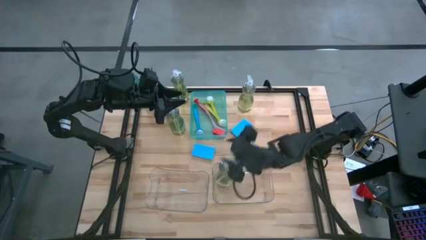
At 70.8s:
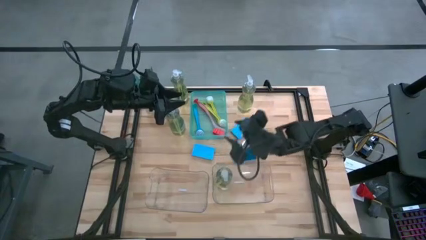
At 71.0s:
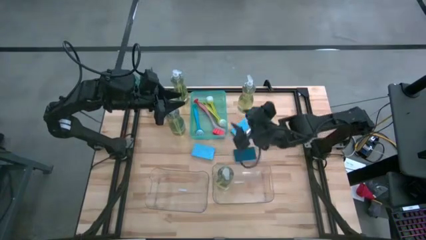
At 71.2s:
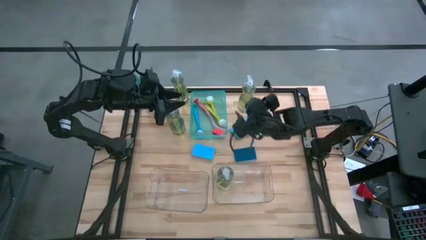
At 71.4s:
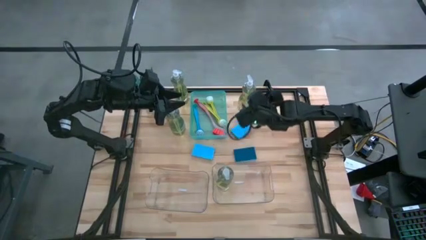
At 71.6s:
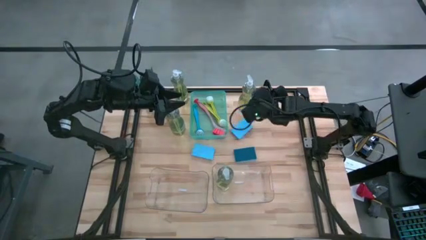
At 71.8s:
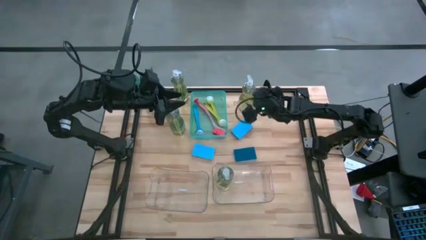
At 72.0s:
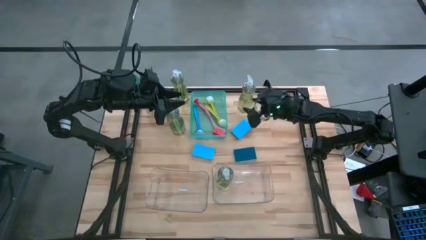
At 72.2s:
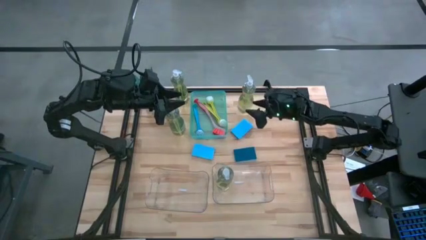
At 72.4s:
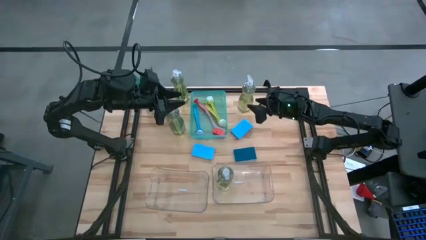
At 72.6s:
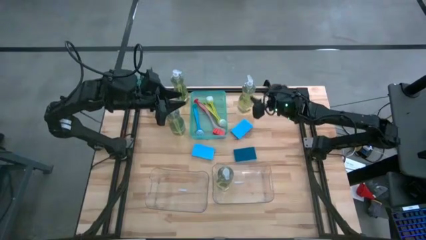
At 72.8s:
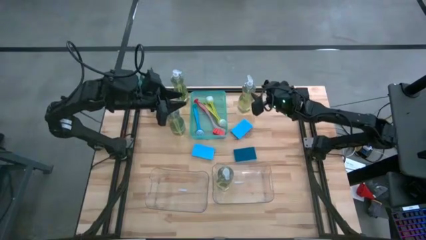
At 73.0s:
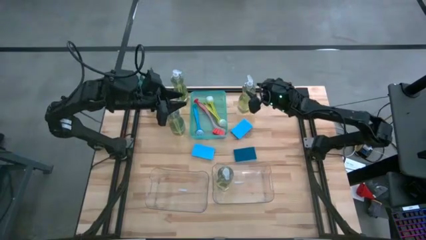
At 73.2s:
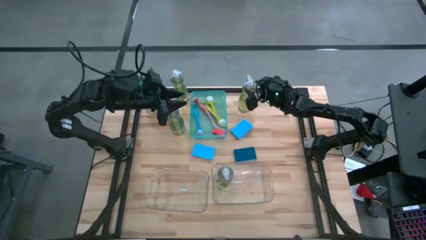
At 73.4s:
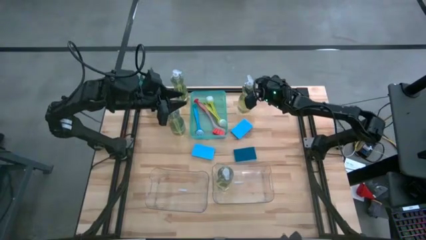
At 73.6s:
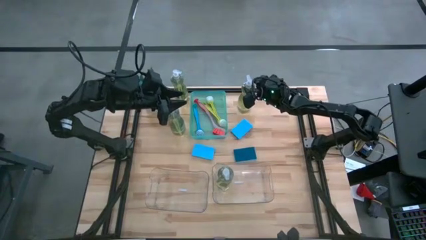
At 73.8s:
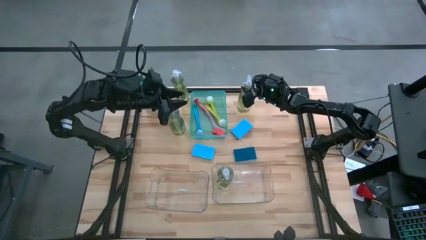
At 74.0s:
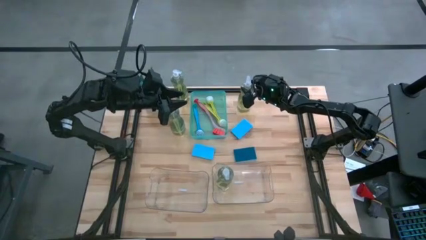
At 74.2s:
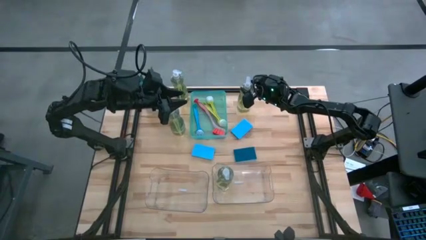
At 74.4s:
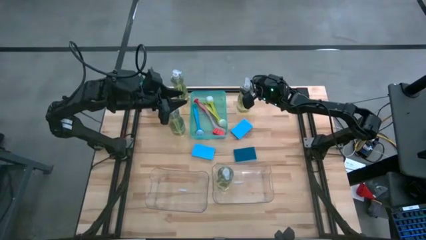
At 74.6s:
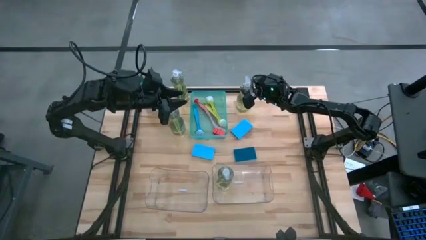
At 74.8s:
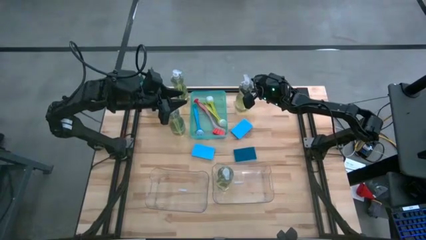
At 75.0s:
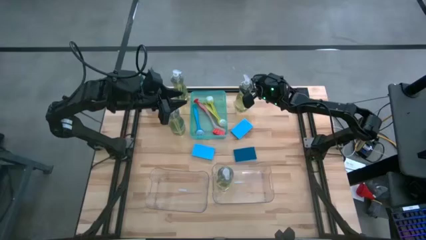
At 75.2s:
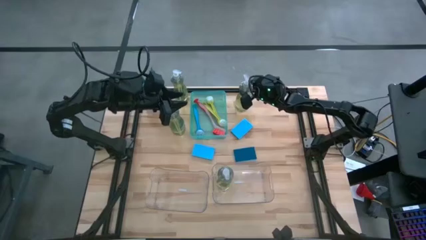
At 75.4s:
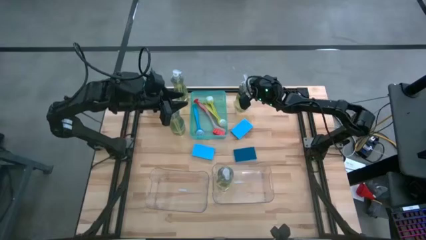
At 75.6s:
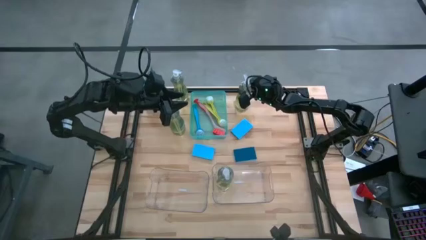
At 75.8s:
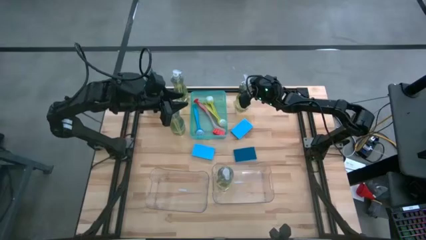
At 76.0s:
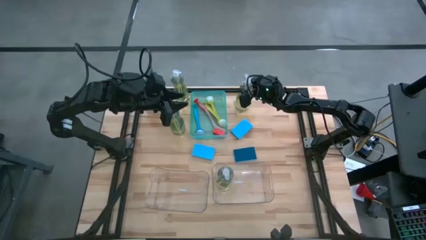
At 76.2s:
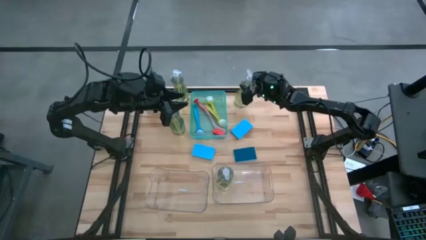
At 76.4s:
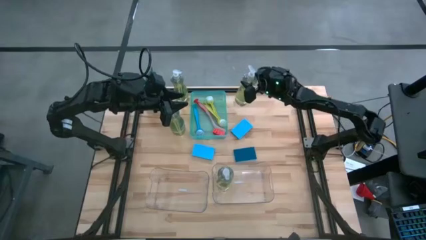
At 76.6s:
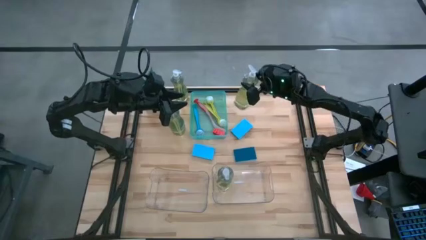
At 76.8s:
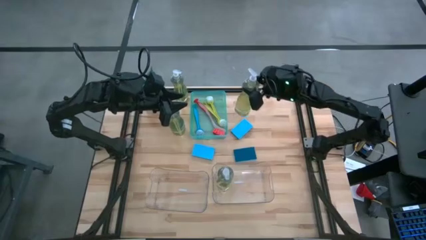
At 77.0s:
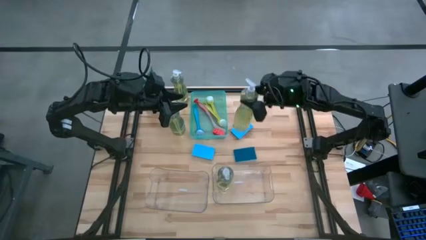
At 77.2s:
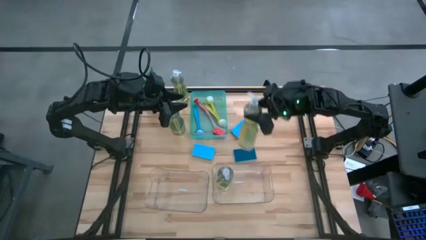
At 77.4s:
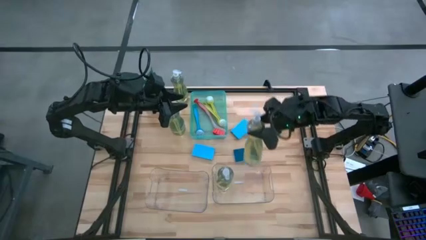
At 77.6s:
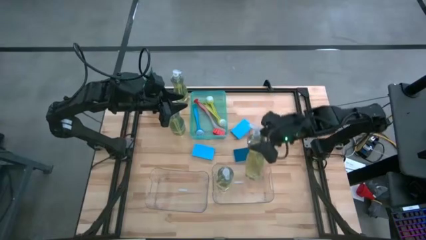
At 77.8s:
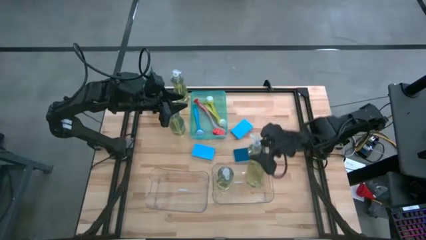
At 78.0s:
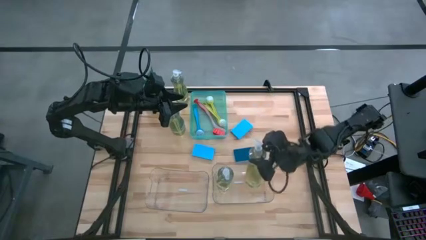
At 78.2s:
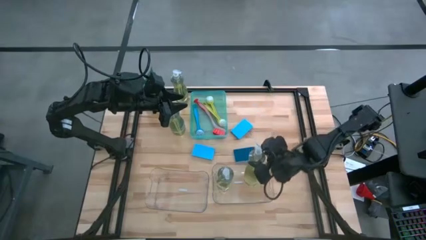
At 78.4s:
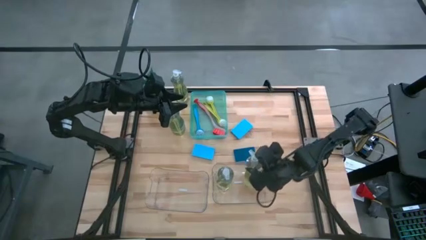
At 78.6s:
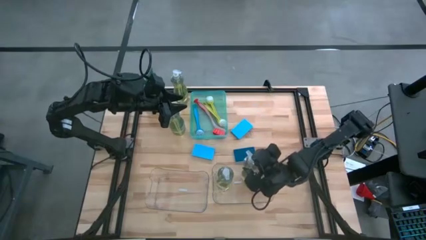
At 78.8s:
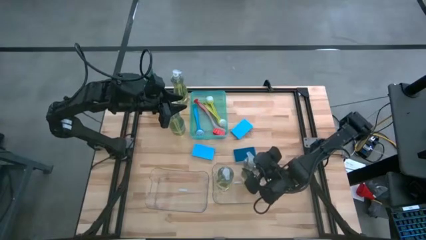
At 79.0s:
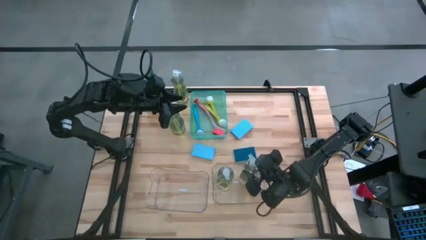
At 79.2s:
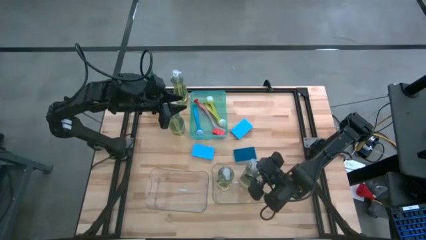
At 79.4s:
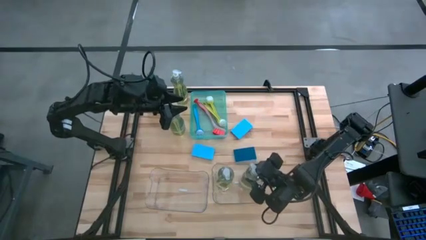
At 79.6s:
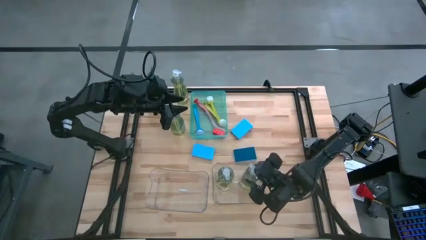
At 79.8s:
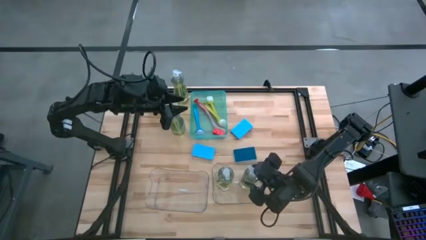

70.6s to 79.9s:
Task: Pick & Place Kitchen Sink Supplies
Put the soap dispenser into the right transparent bin

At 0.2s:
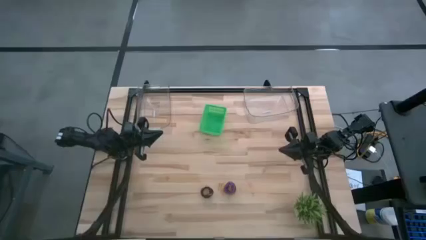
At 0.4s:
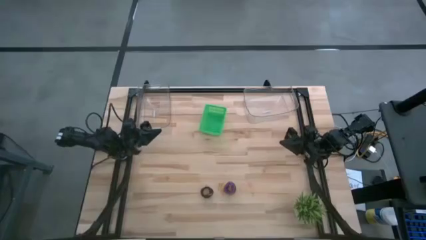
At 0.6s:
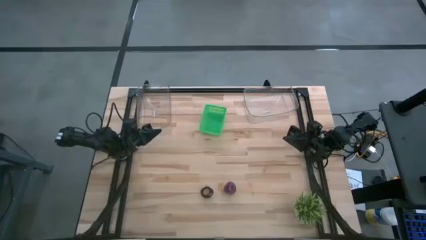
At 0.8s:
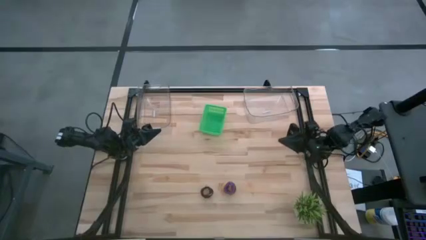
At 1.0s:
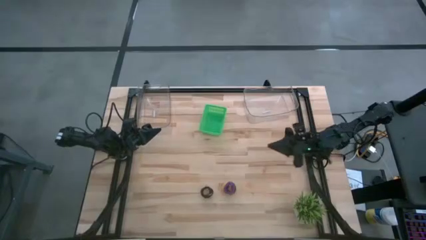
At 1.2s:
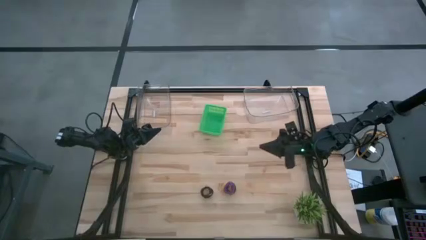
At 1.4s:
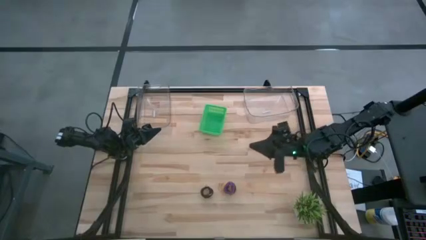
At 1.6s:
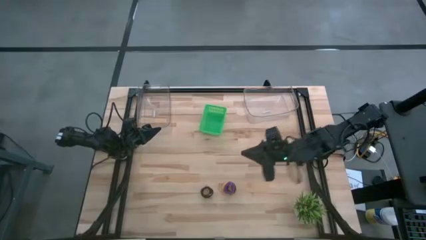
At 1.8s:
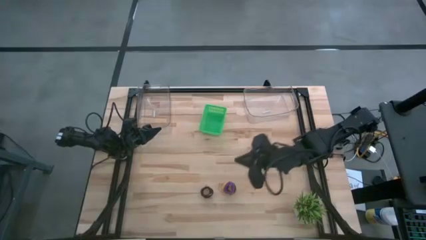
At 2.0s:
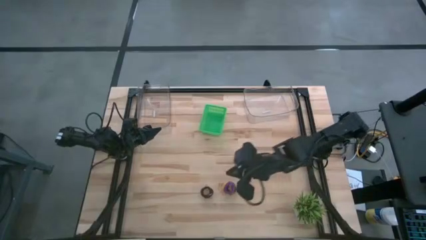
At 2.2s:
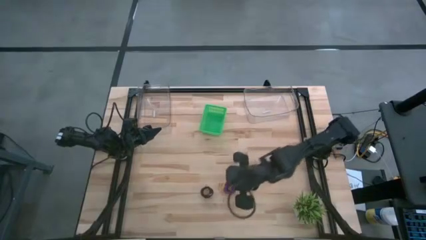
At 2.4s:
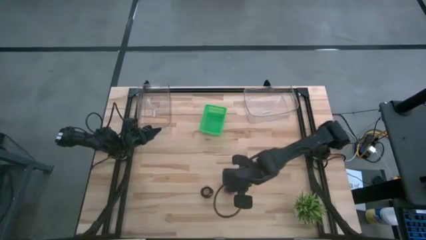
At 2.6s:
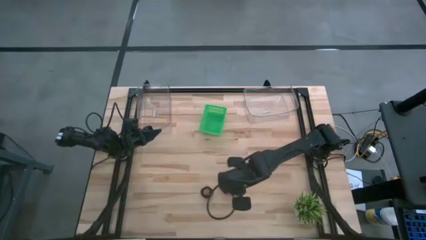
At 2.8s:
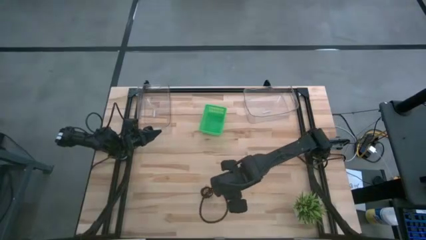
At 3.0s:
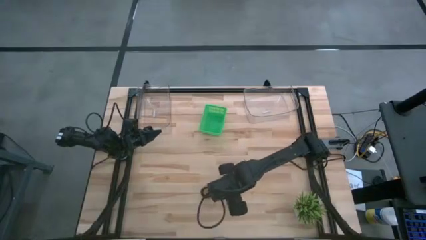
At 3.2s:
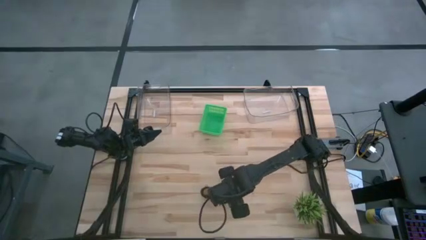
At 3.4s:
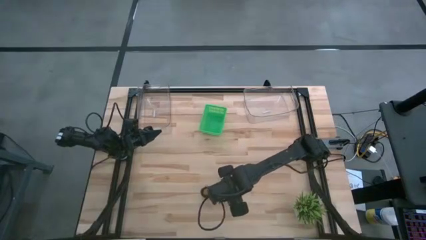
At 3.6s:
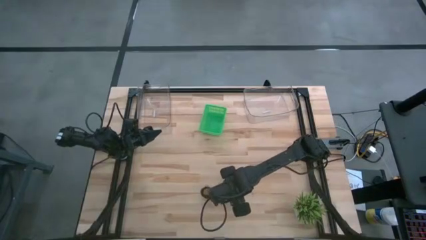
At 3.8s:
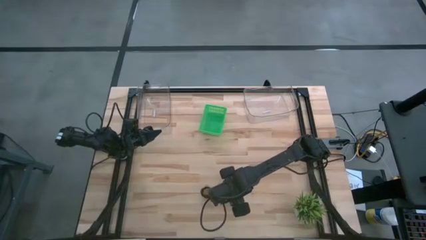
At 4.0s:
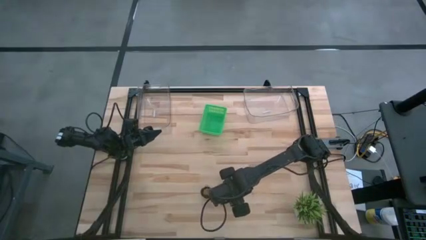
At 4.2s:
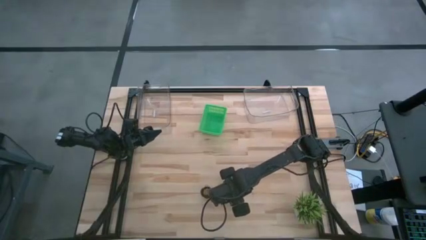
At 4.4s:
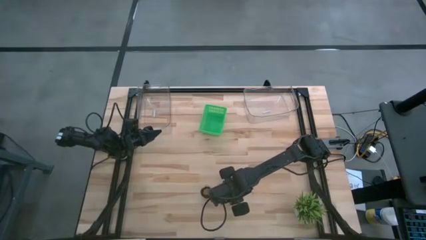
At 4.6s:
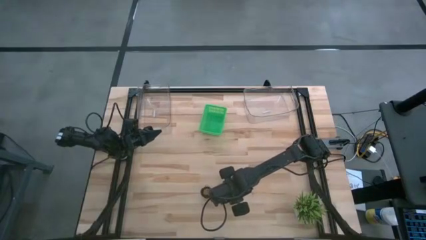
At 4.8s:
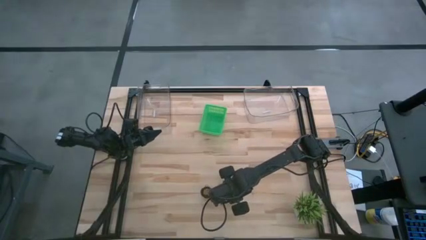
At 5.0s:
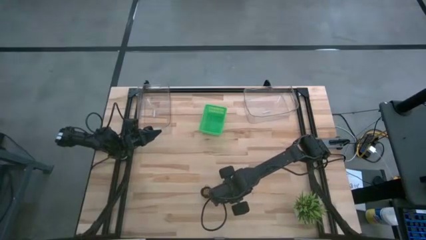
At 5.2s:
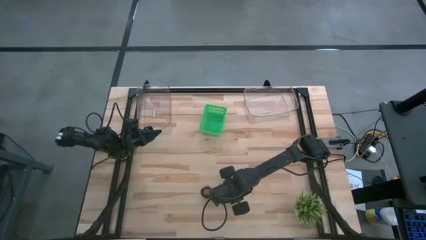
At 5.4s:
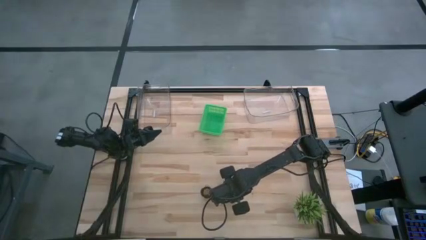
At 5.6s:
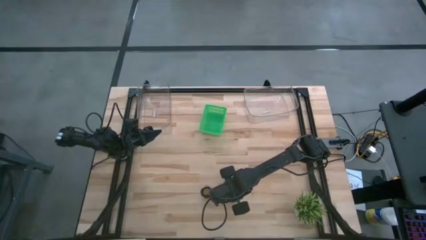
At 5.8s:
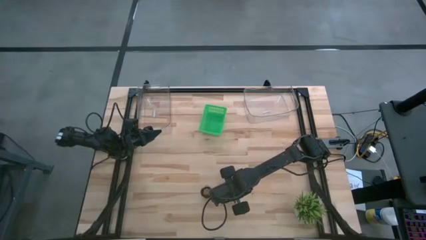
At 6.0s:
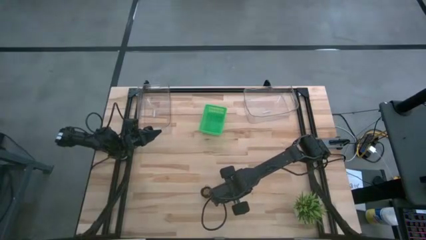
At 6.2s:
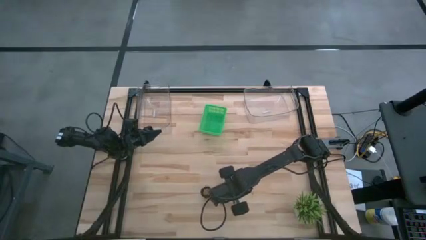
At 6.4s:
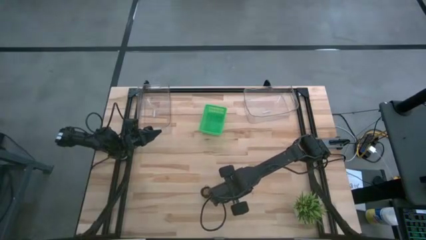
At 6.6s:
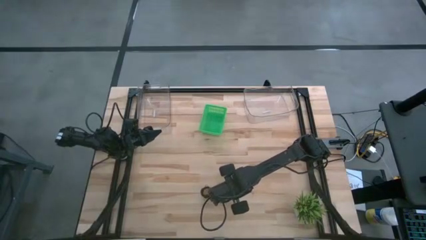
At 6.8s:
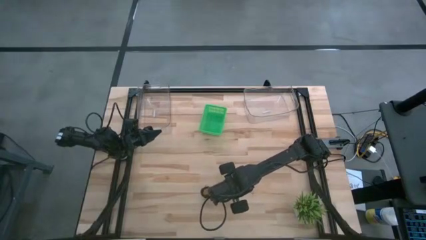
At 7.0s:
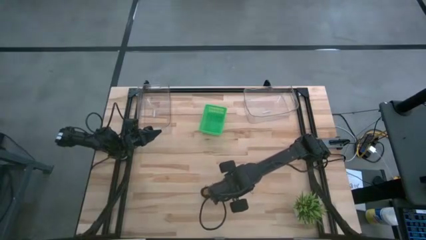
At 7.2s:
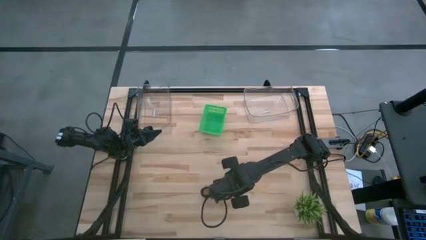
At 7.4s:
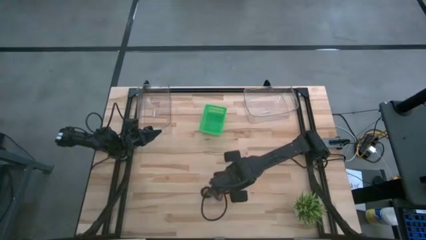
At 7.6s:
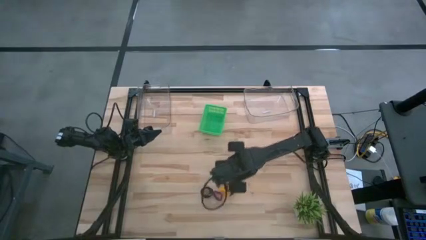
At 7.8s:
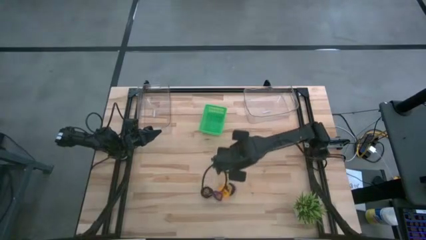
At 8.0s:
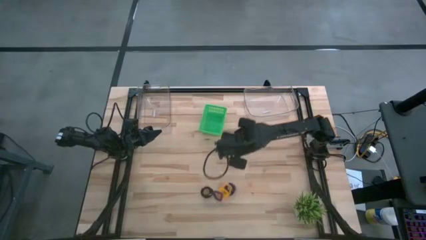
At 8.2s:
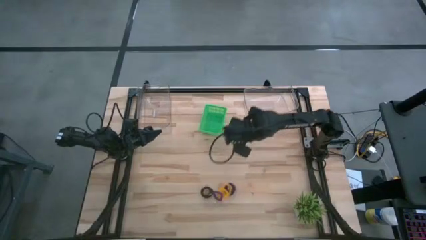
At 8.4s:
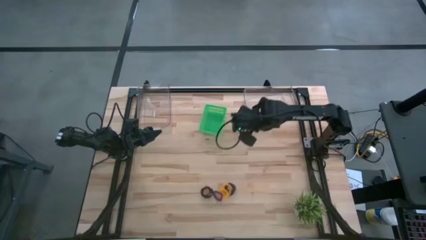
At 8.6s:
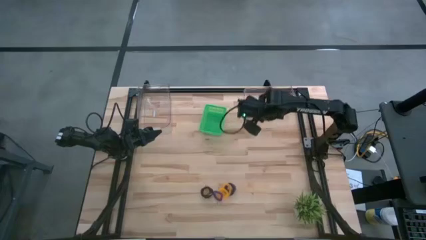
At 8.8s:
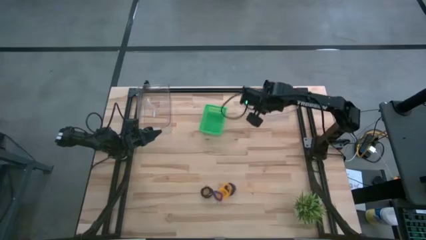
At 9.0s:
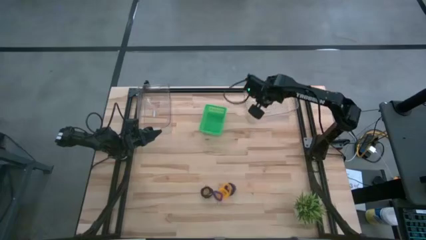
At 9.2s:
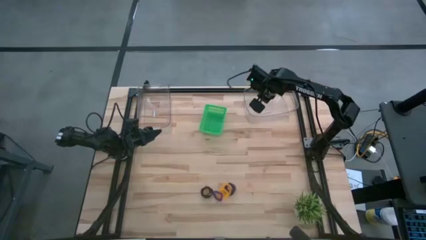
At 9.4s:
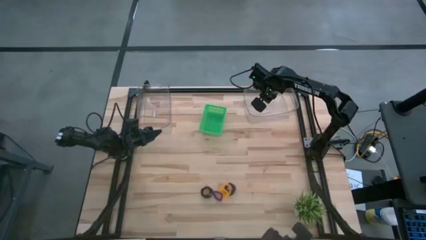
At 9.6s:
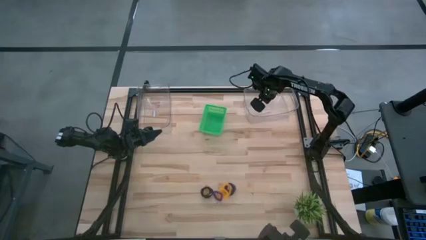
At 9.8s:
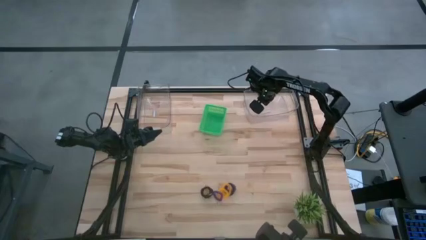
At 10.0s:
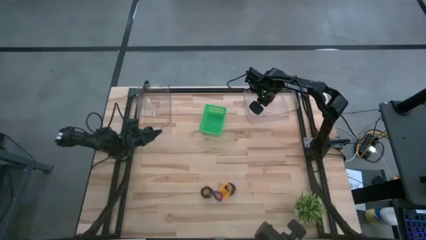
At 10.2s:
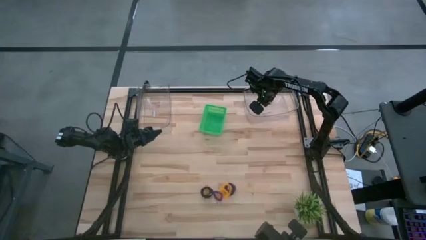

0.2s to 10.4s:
Task: Sort spring keychains
Put the purple spring keychain into the right transparent bin
